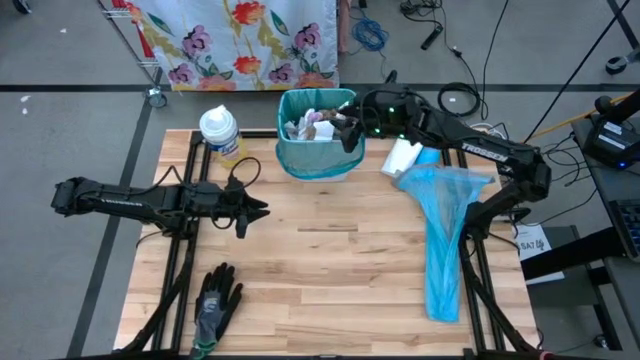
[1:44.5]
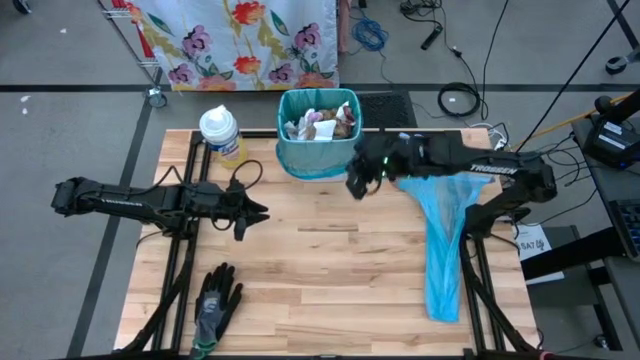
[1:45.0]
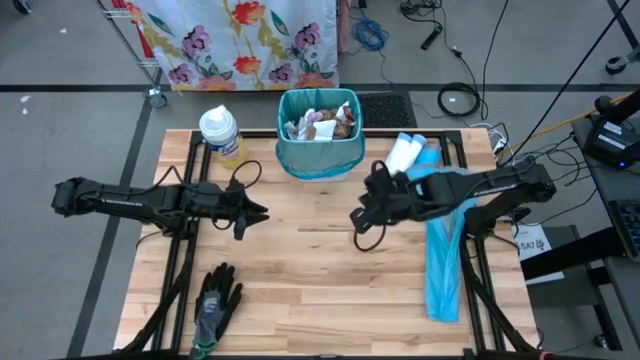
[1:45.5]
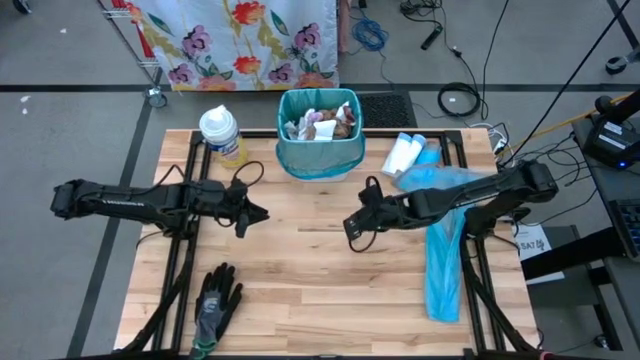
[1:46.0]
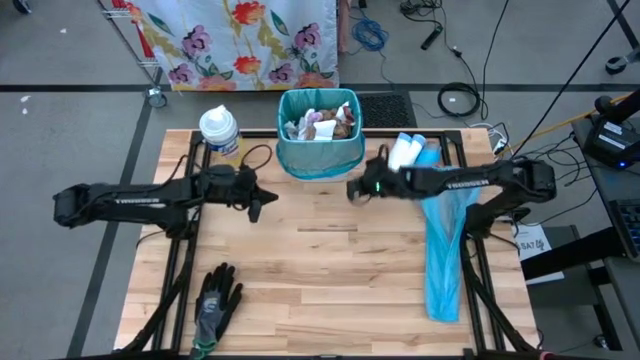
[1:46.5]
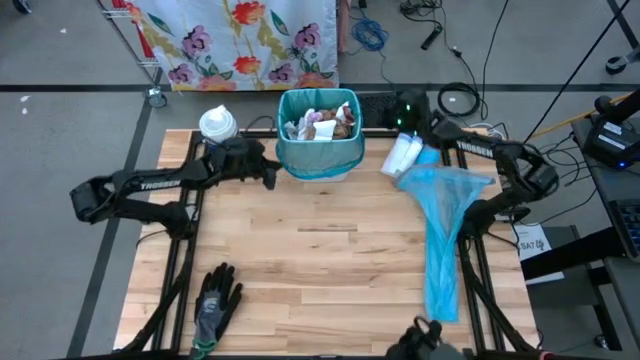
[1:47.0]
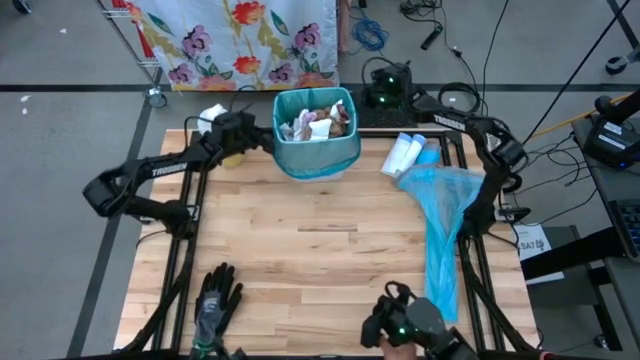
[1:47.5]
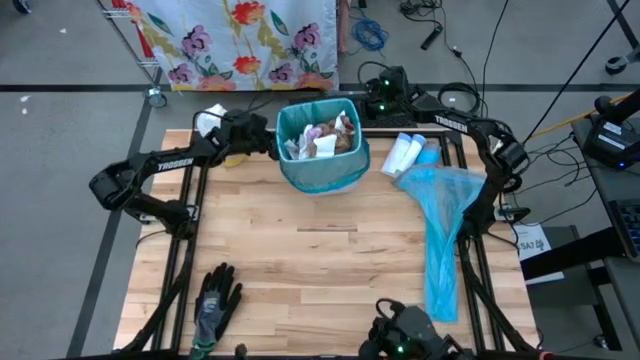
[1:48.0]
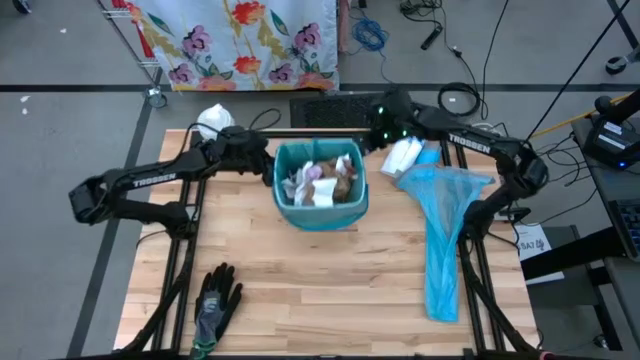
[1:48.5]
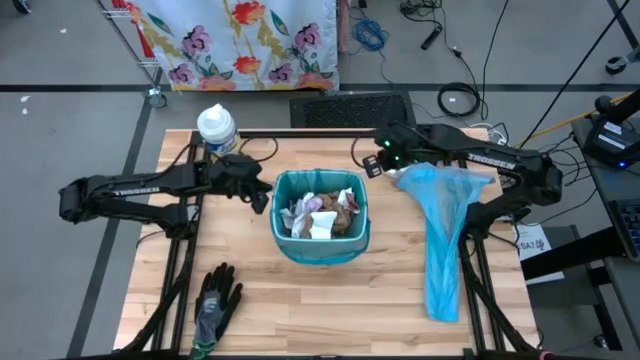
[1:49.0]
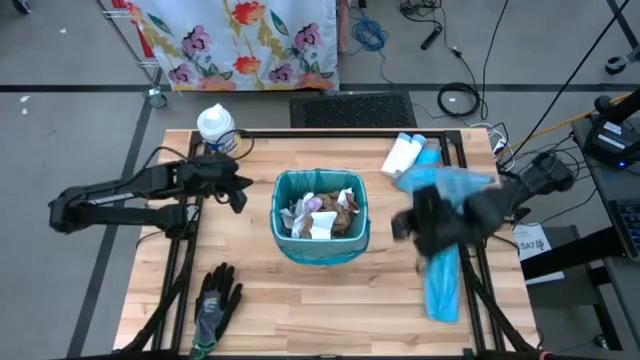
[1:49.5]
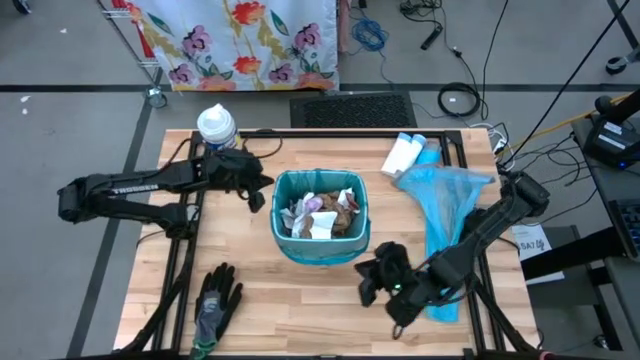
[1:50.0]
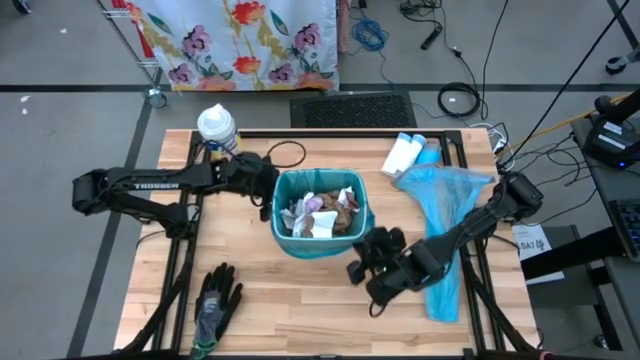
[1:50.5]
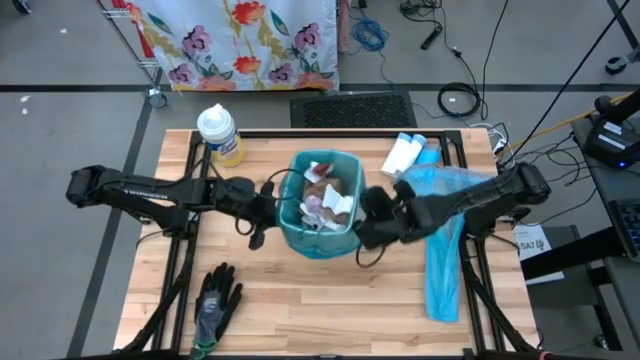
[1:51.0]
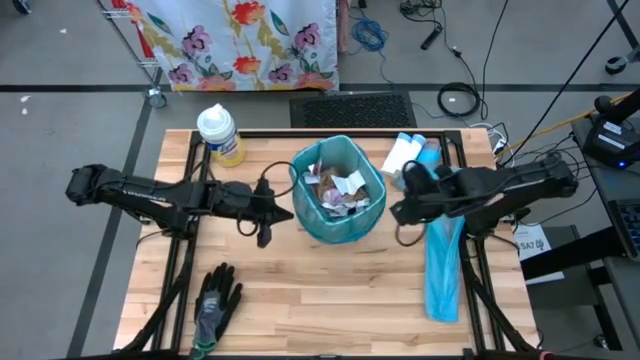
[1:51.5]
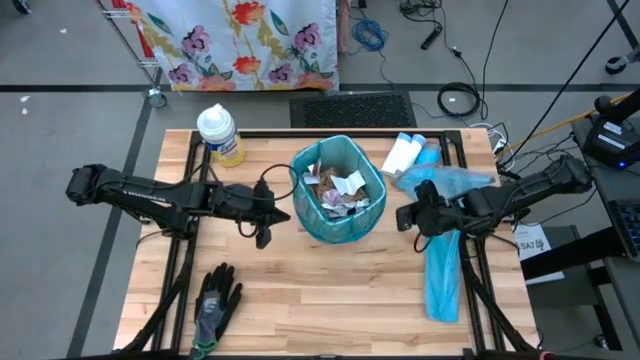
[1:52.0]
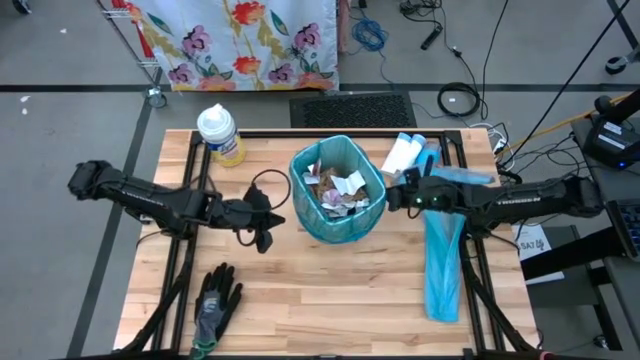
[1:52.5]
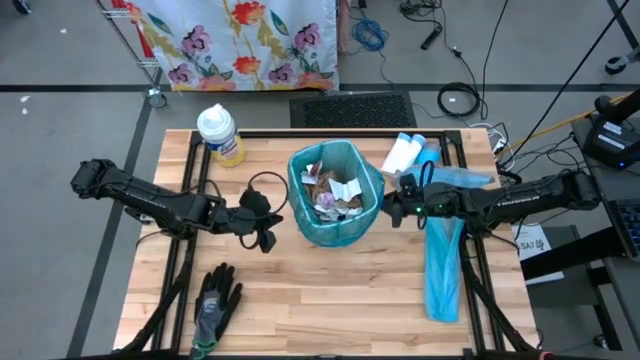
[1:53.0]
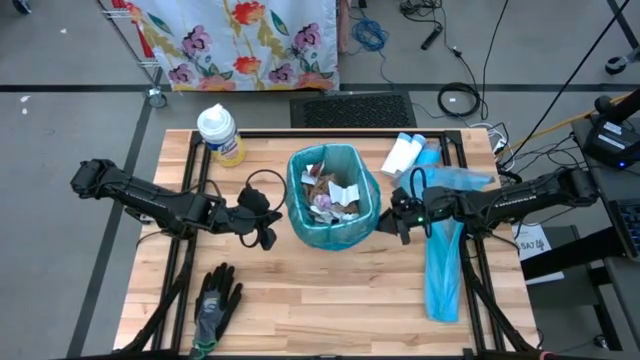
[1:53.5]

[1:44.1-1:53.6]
Task: place trash/remove bag and relplace
Move the white trash bin to the center of the table

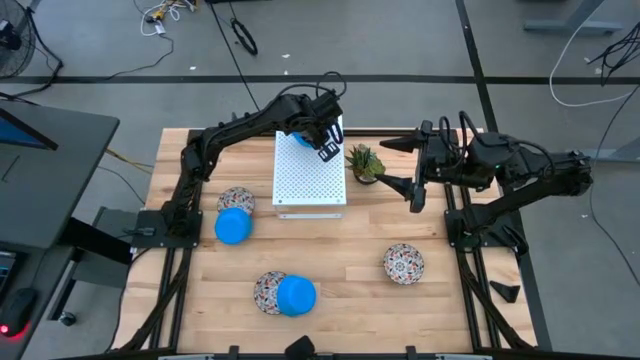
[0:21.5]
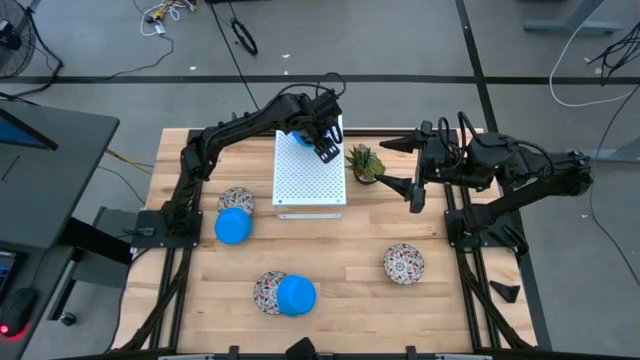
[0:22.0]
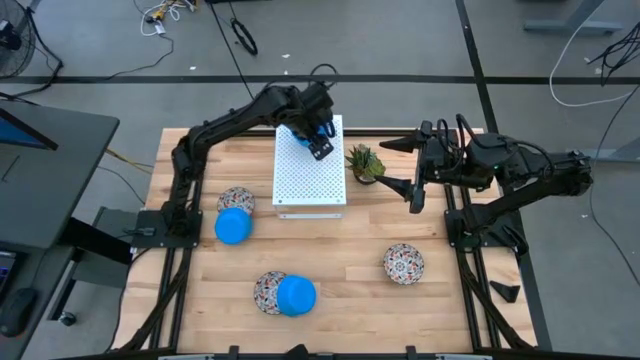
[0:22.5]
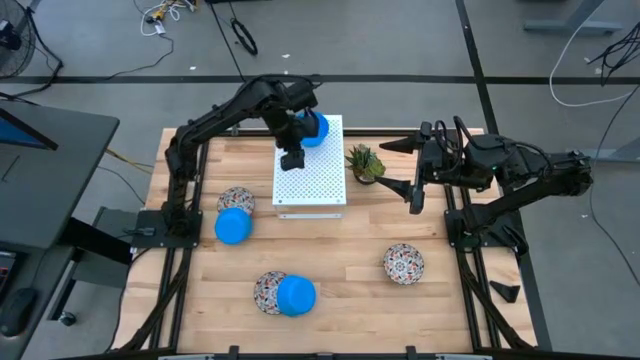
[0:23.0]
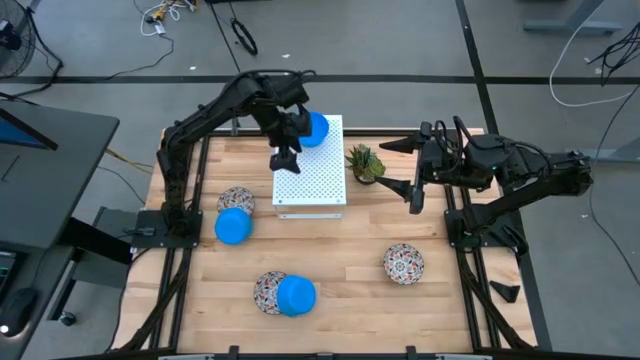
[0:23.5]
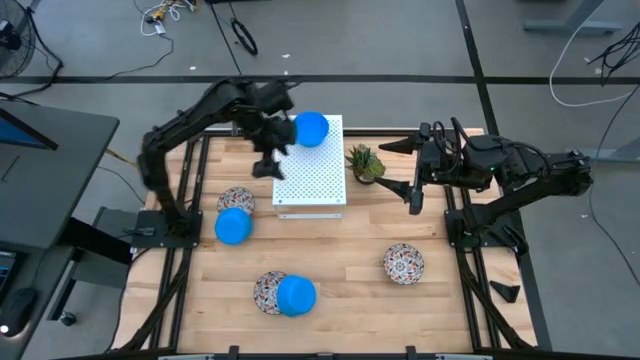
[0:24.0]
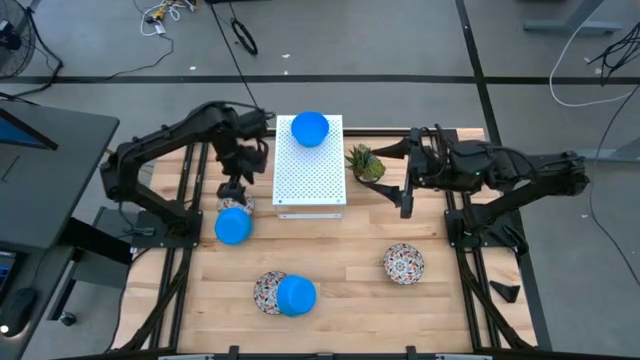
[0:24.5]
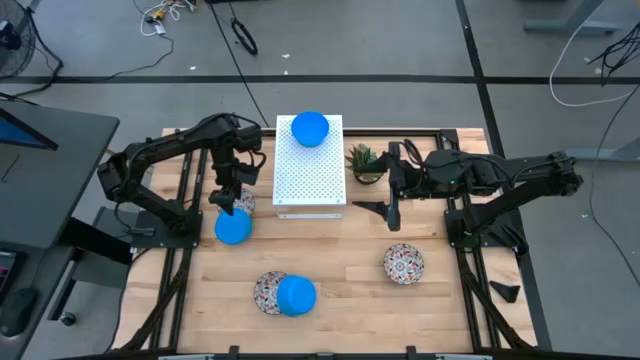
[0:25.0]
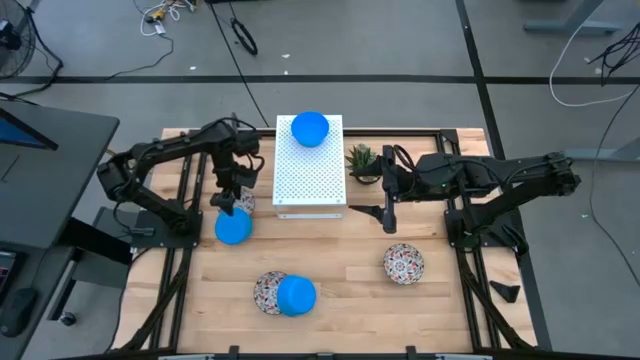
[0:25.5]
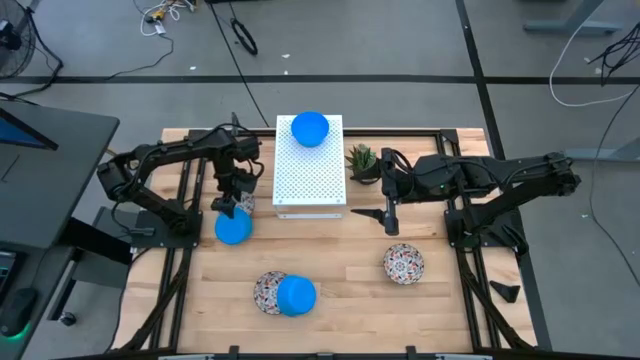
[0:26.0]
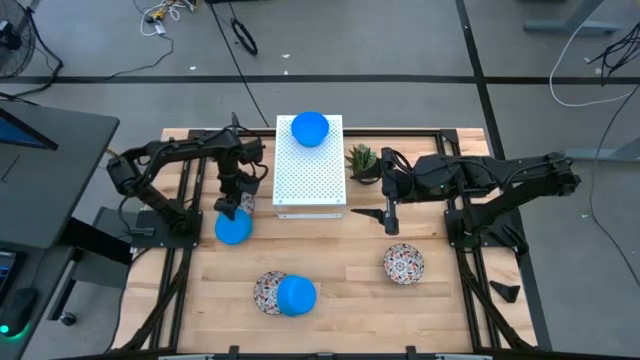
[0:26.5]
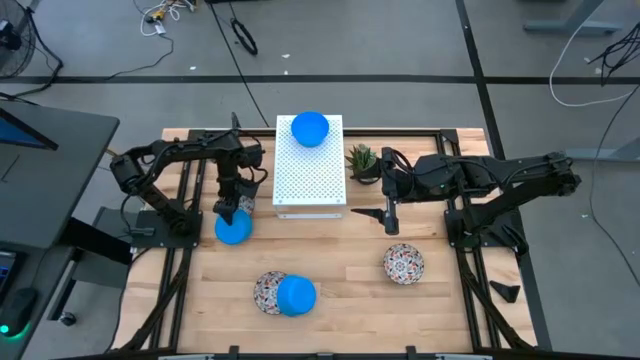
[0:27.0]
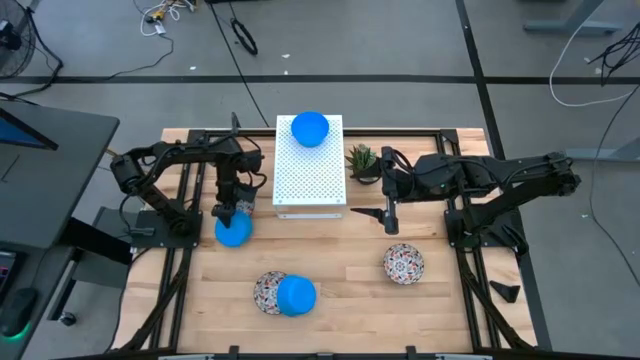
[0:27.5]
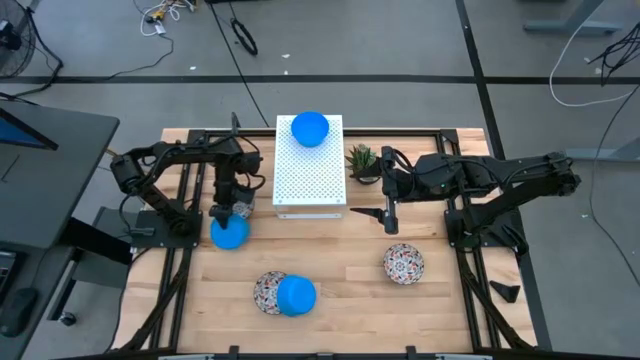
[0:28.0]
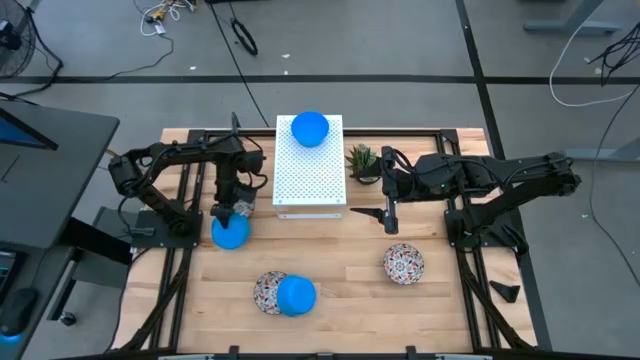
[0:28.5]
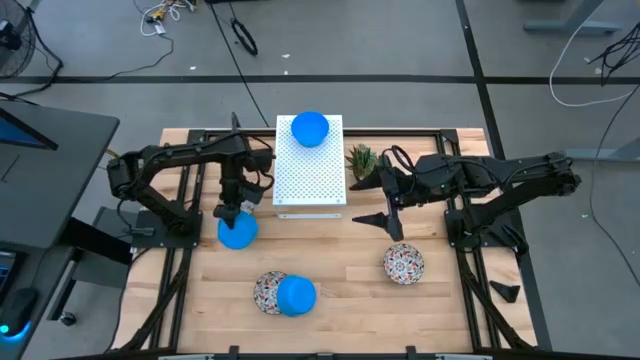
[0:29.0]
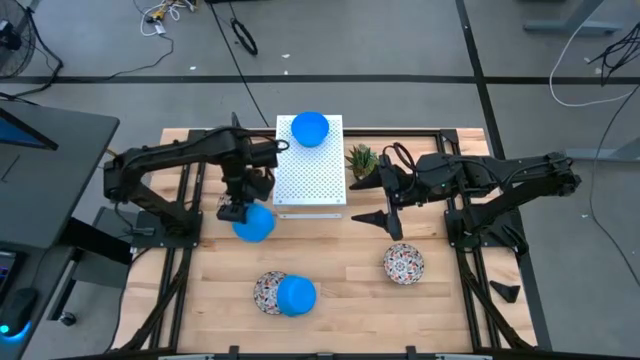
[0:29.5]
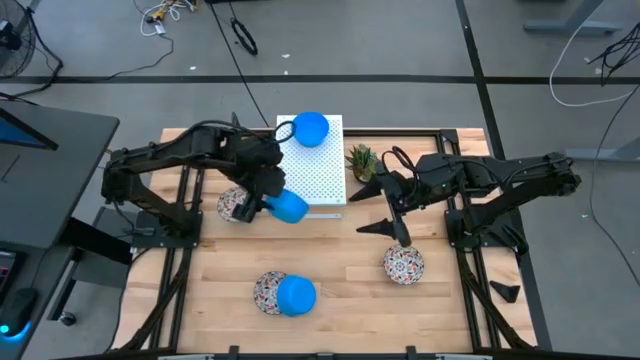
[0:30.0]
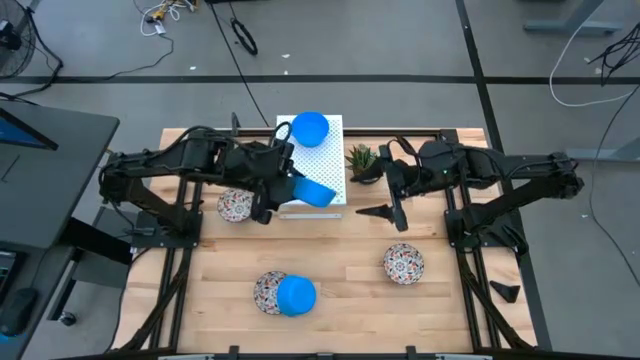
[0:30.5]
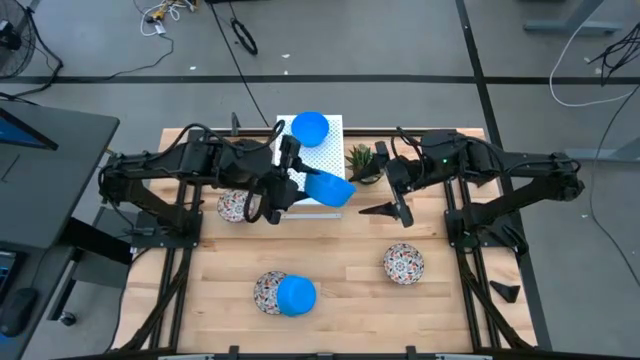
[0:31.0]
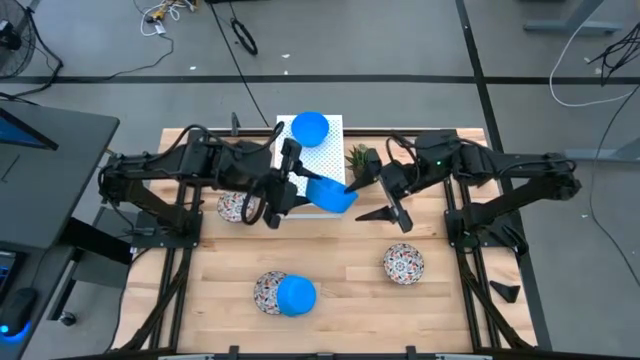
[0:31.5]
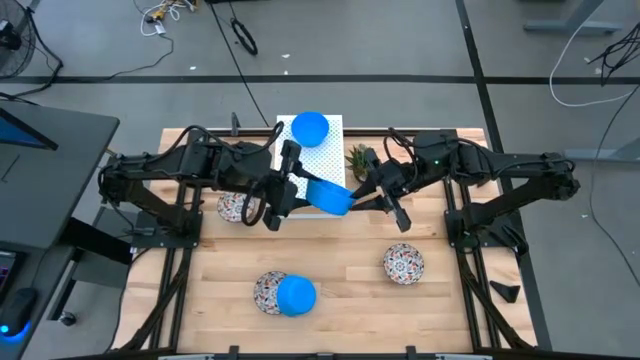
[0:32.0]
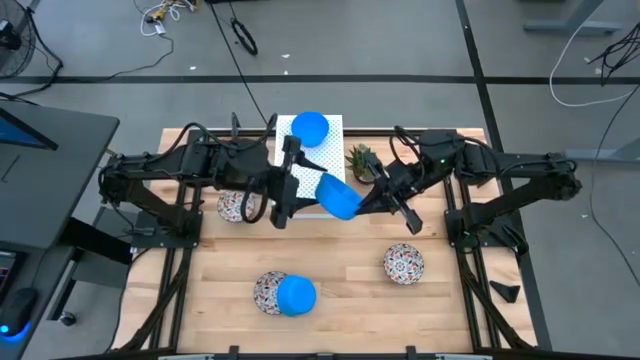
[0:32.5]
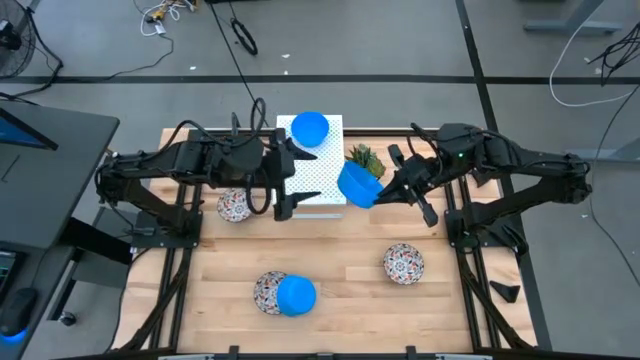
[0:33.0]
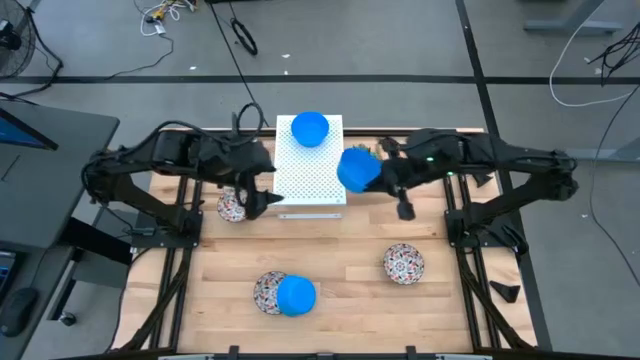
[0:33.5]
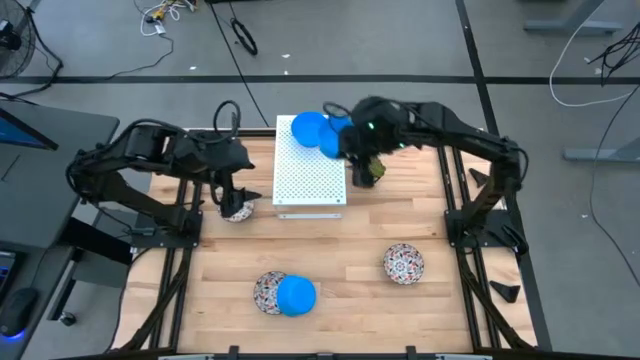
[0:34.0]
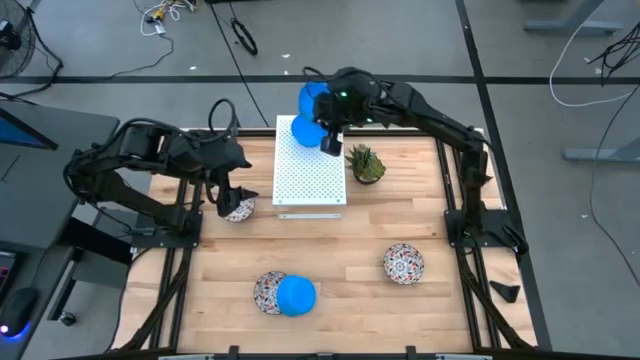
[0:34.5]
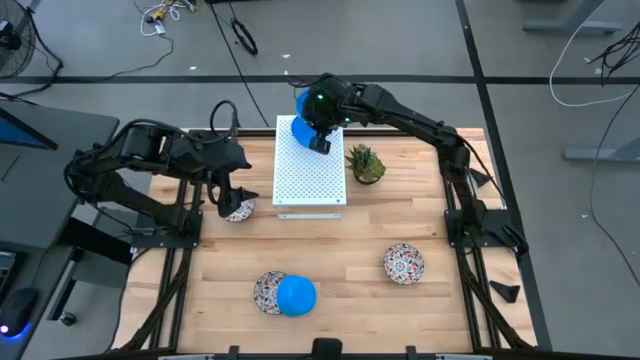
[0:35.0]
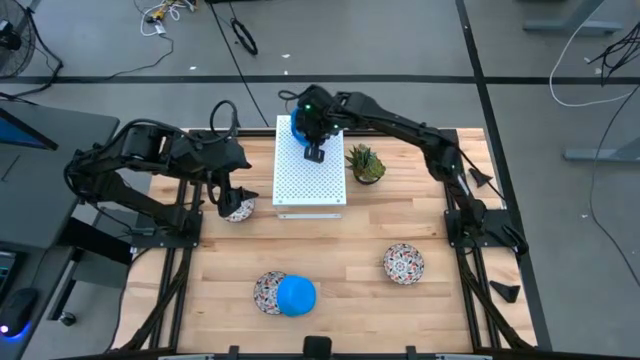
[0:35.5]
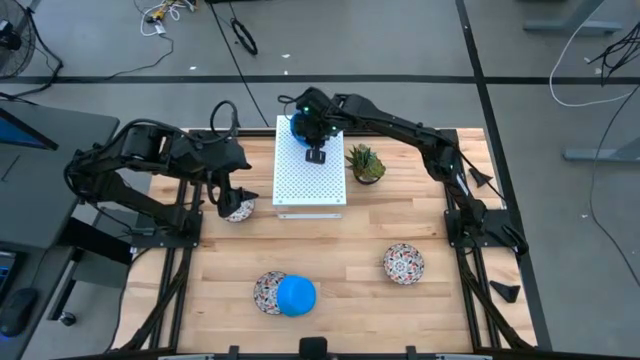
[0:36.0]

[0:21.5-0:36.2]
Task: Pick & Place Mini bowls
Stack the top blue bowl on top of the blue bowl on the shelf
